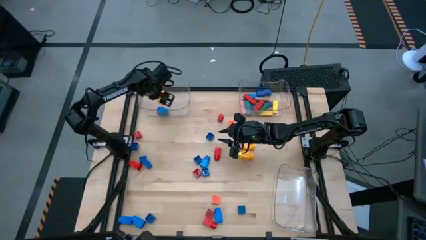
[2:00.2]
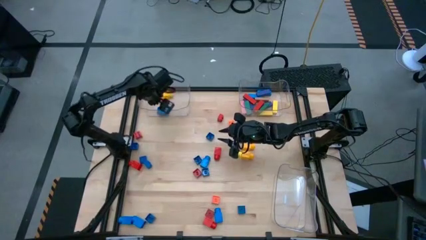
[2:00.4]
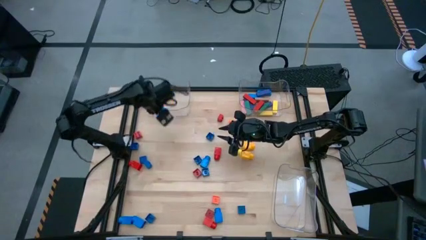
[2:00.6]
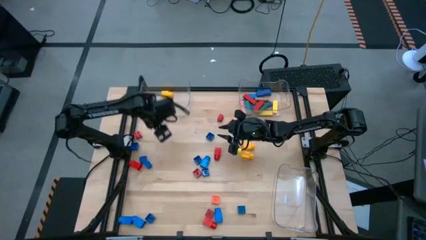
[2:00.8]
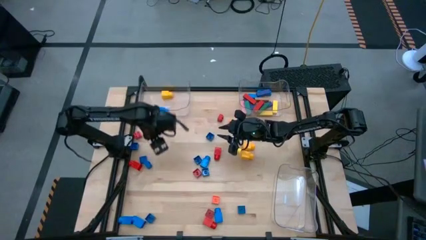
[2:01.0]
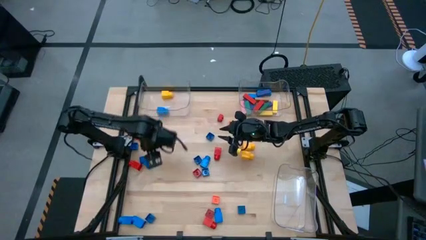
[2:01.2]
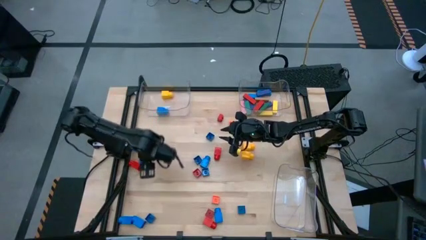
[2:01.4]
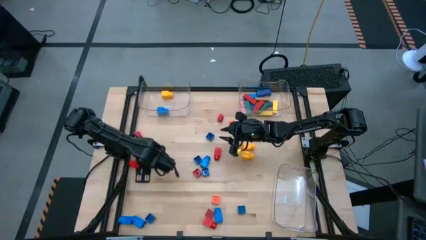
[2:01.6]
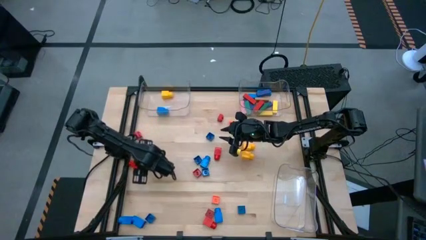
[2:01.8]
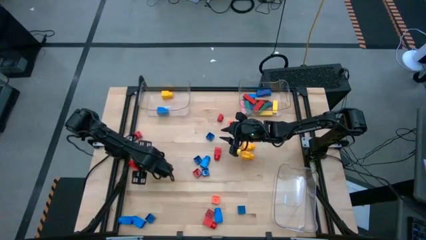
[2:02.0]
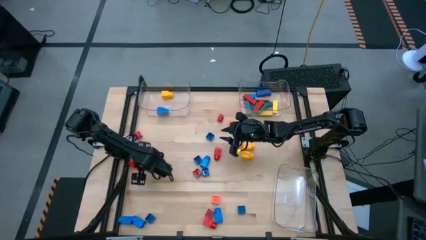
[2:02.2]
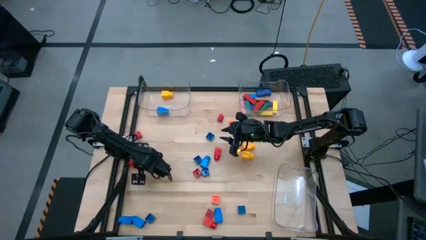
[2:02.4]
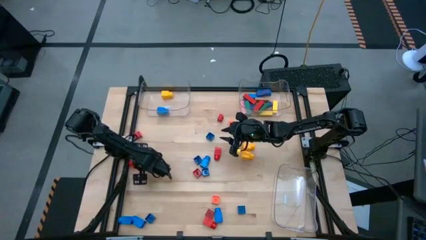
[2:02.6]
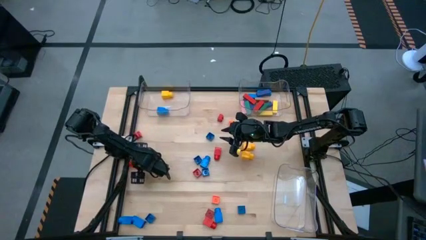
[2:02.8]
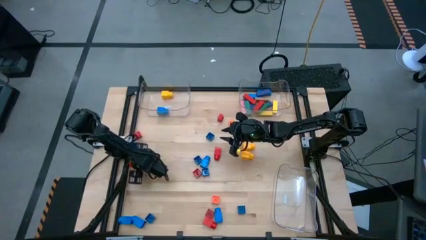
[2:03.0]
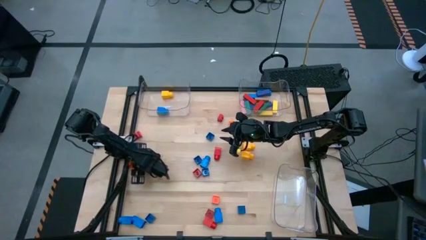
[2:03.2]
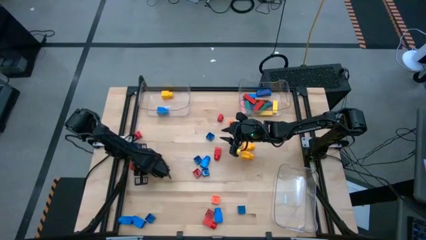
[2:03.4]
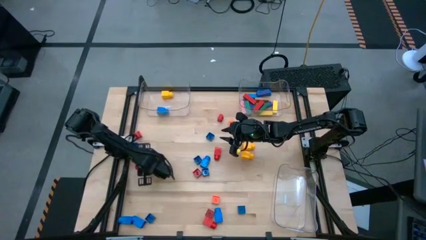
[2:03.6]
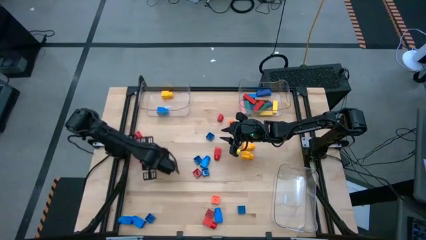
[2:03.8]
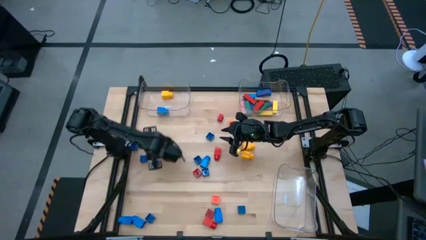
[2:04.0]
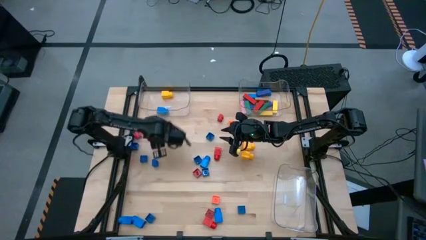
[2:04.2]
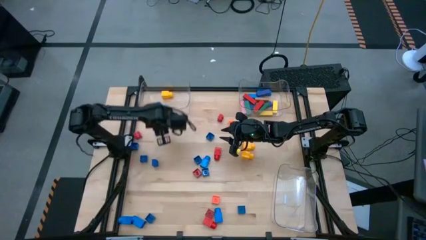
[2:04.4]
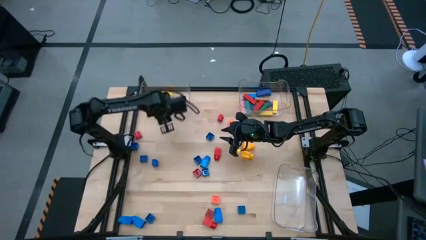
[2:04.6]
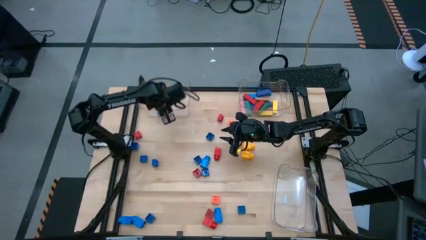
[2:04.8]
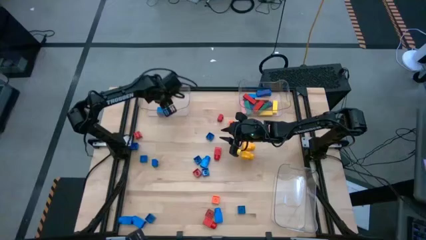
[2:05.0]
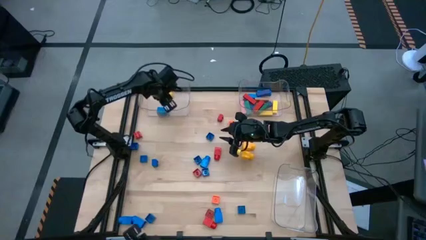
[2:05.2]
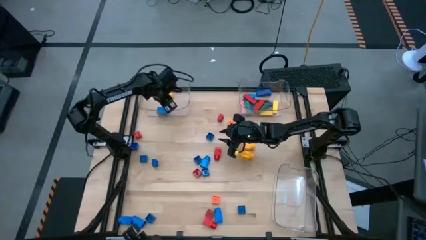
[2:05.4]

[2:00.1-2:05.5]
Task: Sort blocks by size
Put the 1 stud red game piece into the top left transparent bin

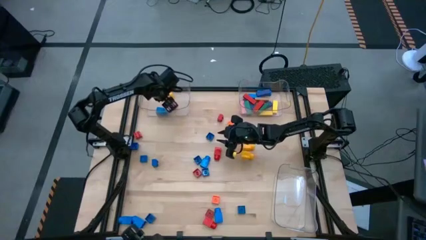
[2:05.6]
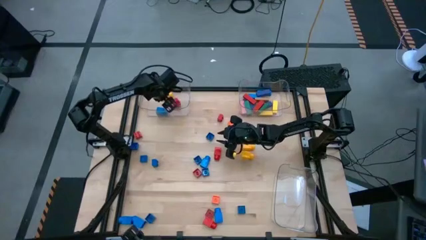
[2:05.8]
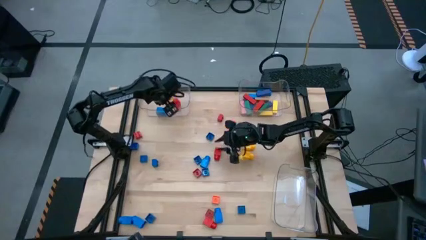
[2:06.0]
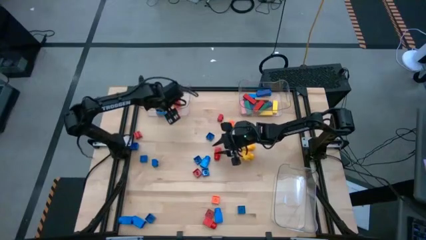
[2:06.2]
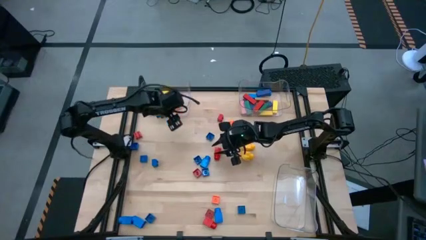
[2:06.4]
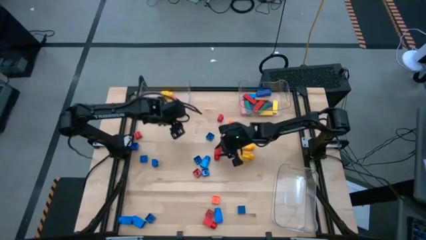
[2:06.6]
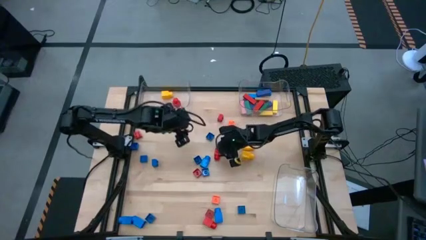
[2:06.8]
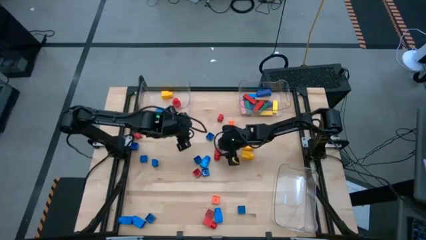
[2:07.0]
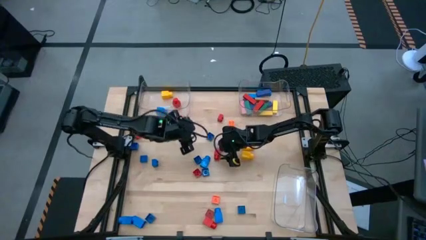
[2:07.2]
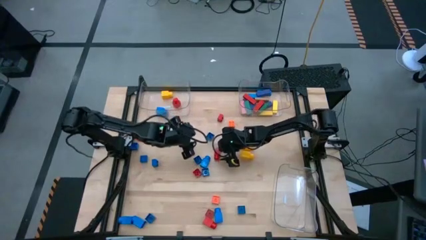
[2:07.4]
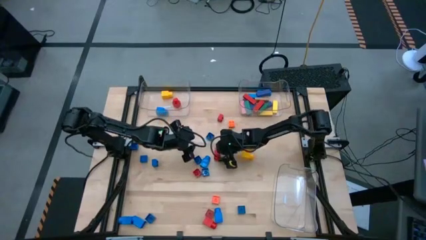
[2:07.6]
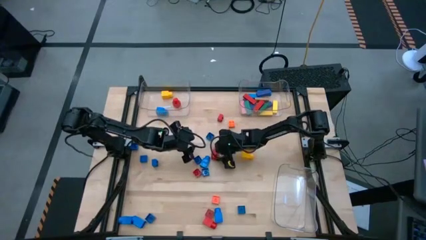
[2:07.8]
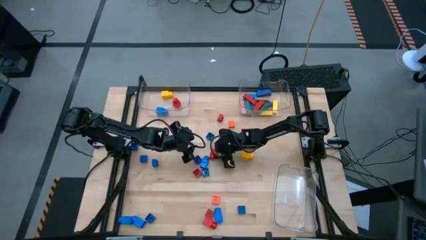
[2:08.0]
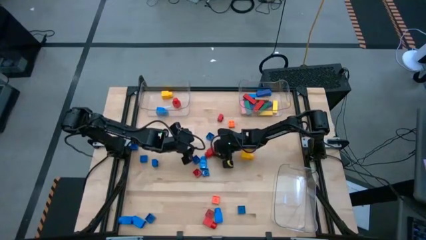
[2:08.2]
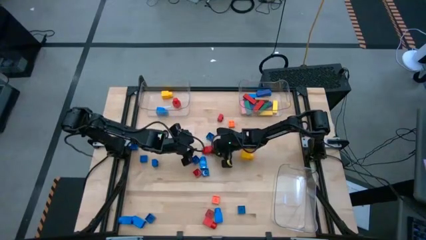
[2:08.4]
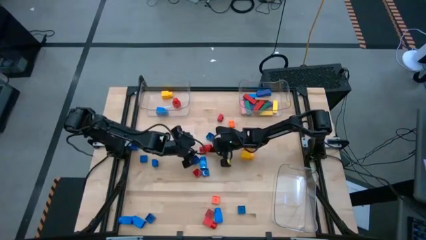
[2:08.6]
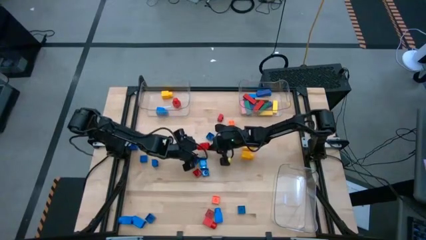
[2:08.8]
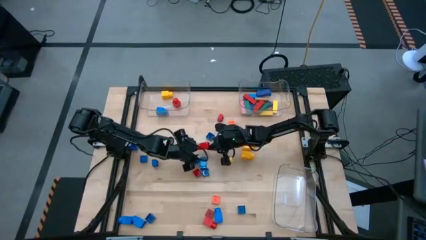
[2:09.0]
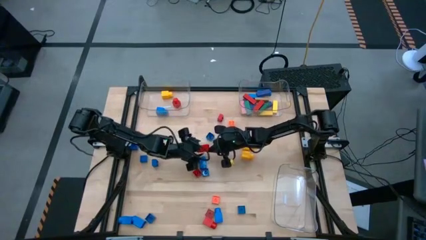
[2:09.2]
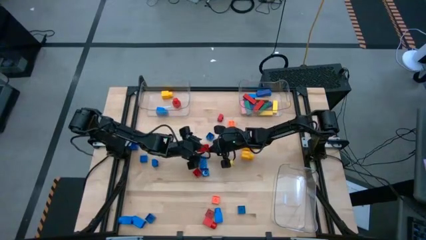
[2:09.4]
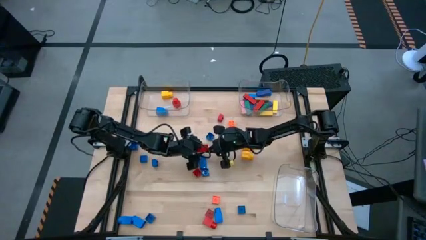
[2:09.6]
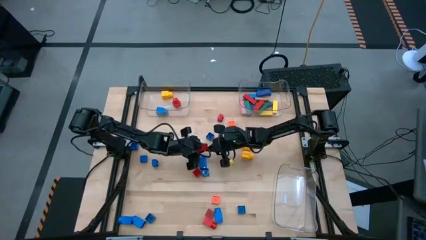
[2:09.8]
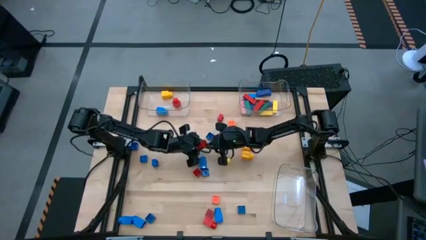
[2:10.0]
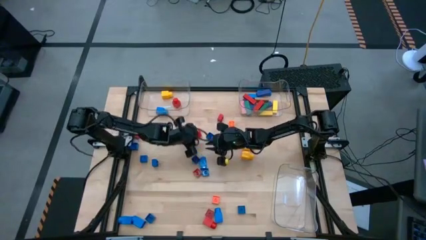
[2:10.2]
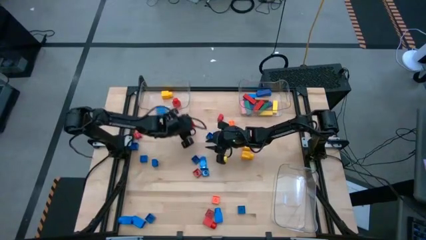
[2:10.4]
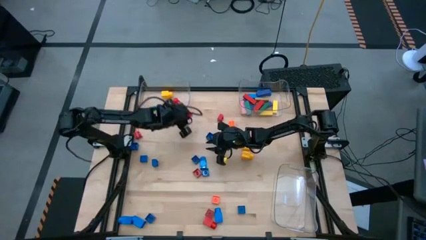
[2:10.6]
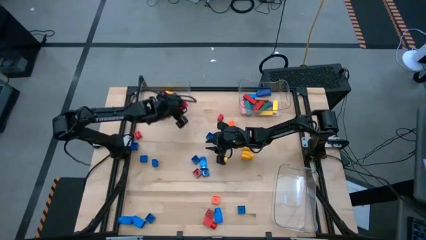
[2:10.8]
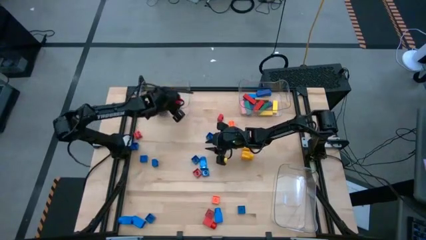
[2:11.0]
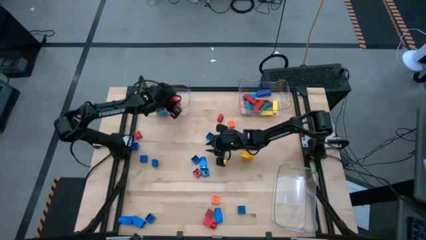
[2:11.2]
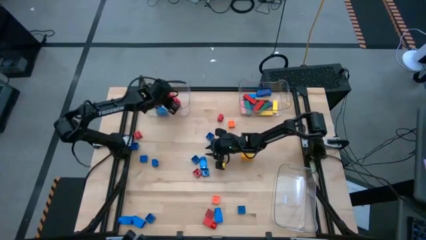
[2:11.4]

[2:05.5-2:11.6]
Put the 1 stud red game piece into the top left transparent bin

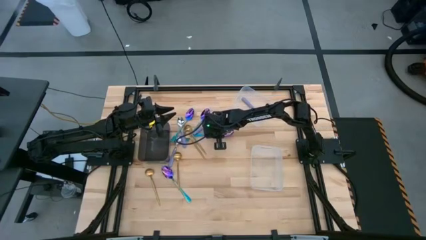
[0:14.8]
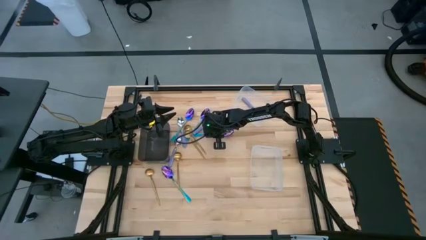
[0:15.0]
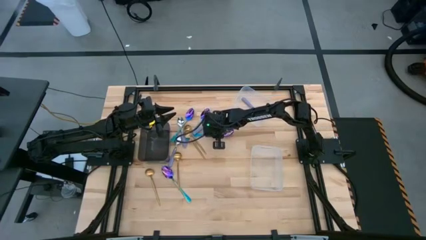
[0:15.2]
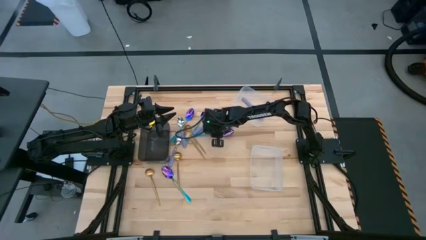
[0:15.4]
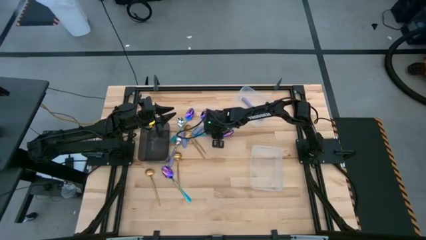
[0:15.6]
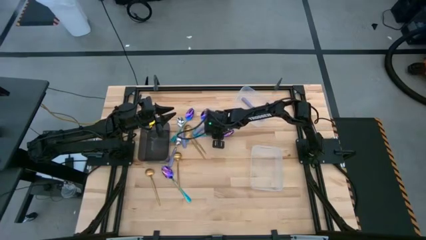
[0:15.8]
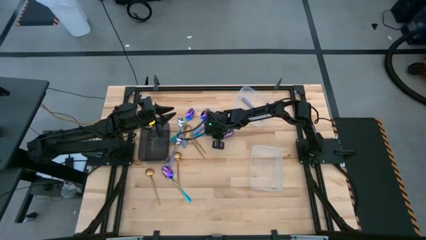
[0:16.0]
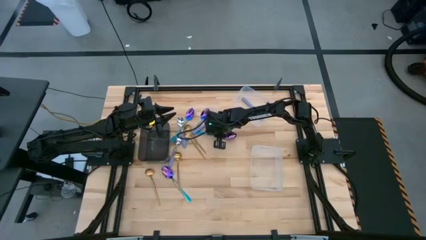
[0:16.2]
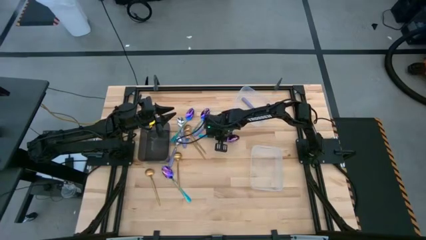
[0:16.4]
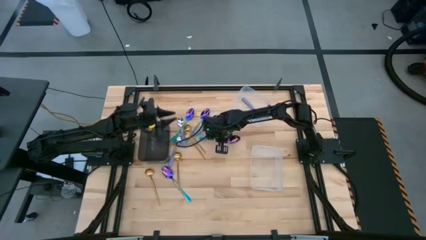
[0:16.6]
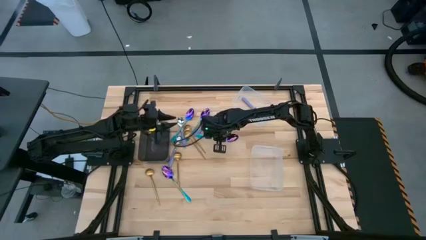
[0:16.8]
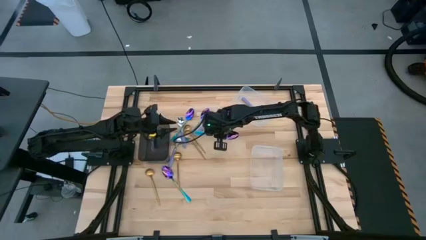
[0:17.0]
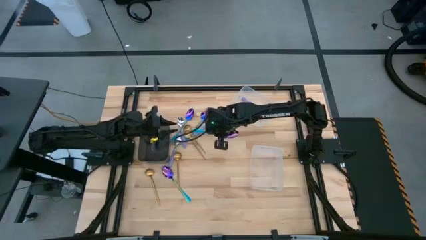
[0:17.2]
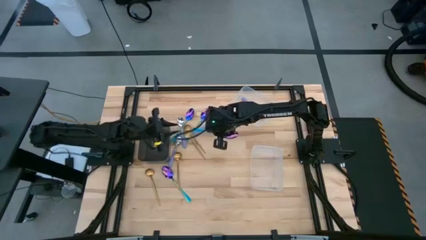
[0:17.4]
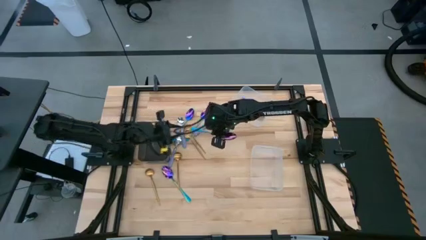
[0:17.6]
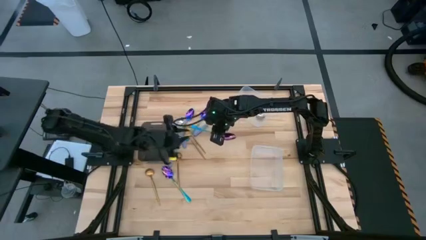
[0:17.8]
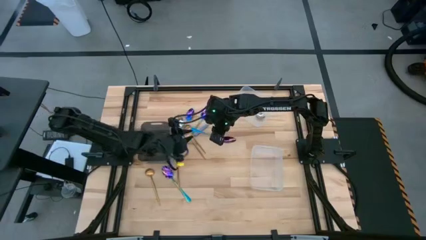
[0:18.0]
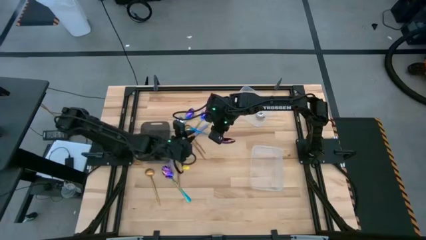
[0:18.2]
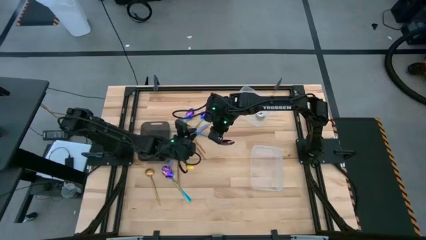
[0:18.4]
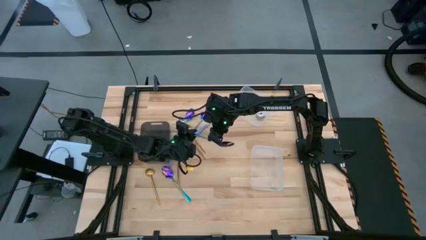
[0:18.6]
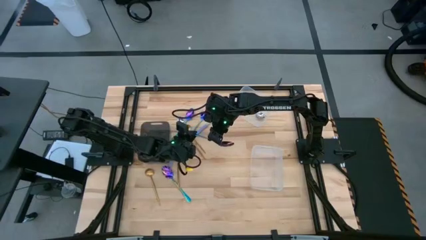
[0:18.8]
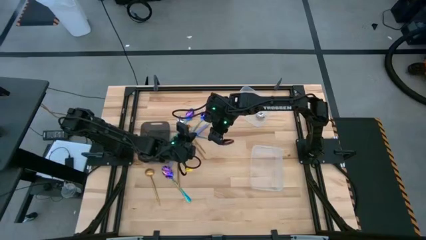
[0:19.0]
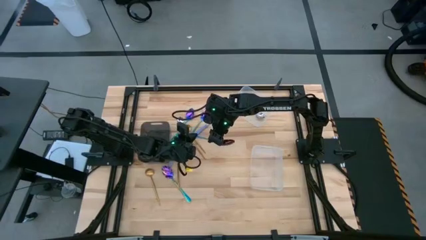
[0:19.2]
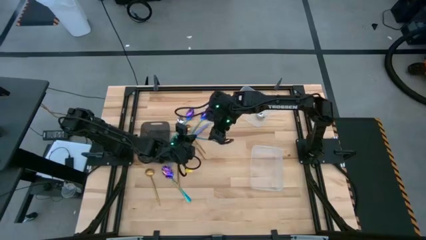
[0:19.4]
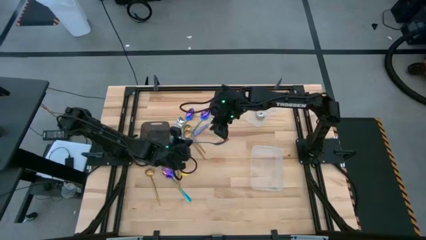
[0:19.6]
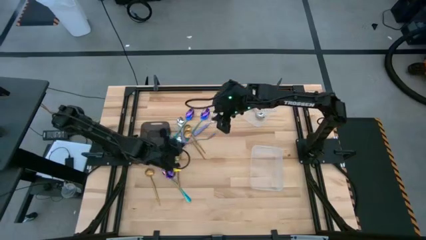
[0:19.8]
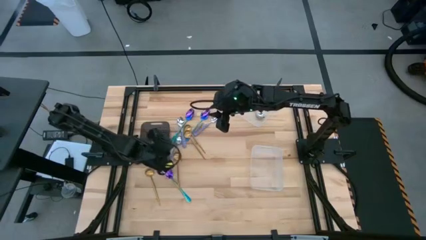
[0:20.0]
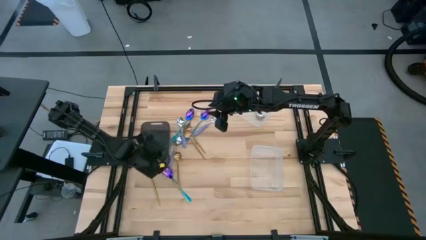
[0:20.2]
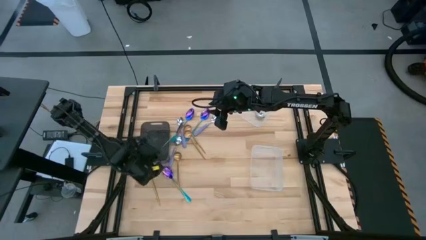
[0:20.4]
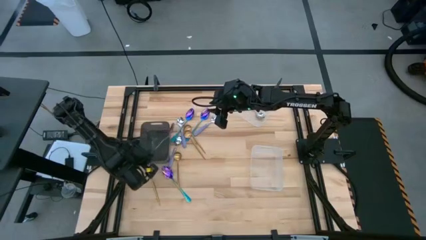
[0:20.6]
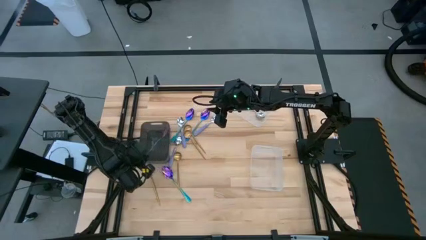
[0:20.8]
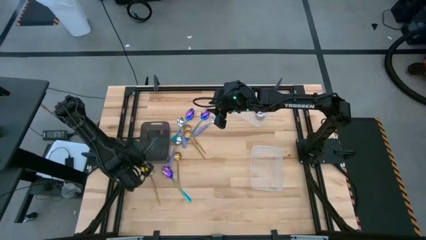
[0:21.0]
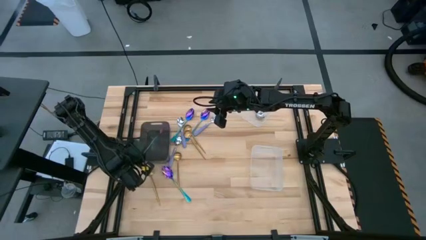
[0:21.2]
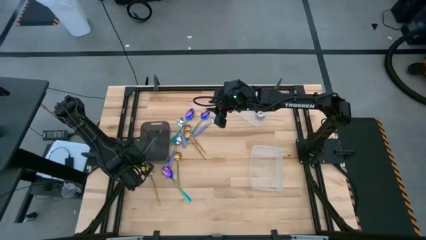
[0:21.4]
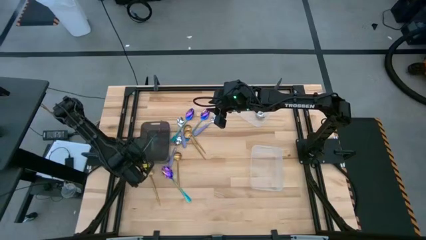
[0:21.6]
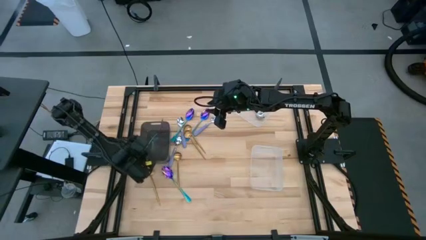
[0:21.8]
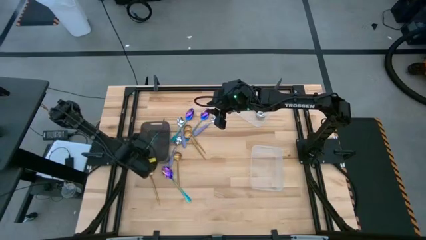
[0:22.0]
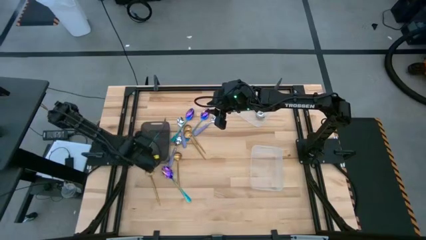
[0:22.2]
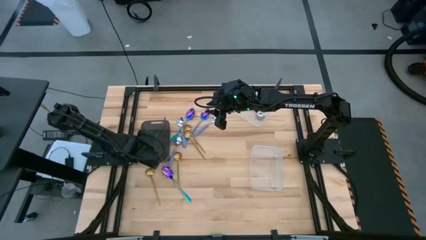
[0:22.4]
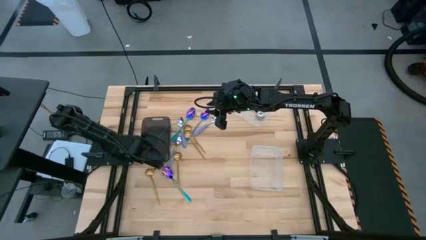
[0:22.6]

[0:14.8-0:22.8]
Task: Sort silverware by color (type)
Put the blue spoon into the black bin
